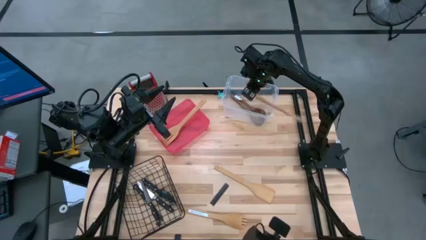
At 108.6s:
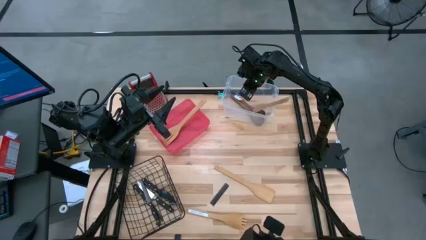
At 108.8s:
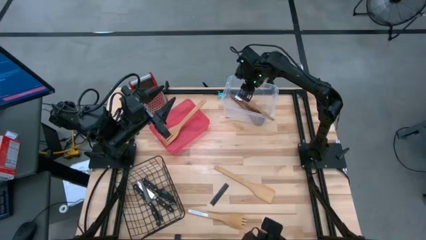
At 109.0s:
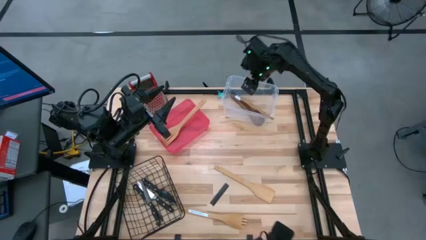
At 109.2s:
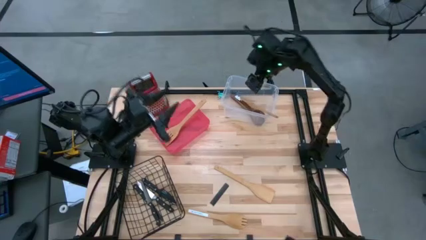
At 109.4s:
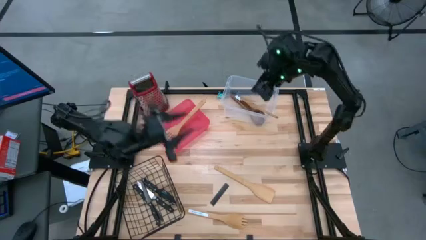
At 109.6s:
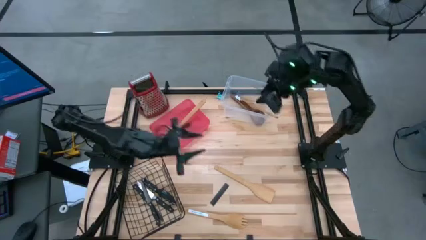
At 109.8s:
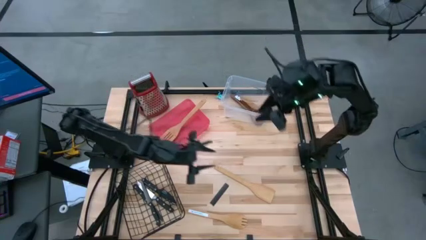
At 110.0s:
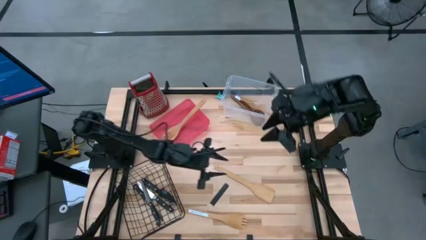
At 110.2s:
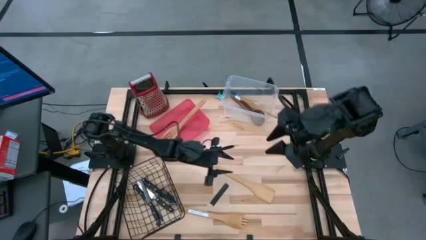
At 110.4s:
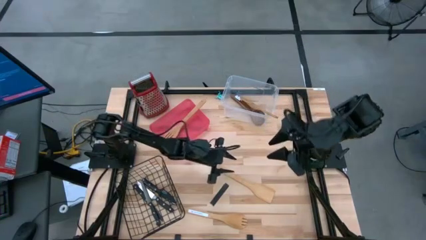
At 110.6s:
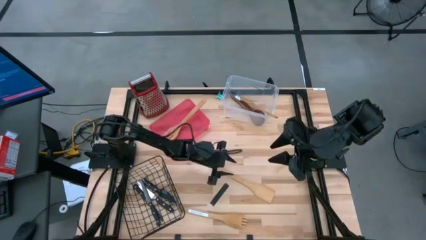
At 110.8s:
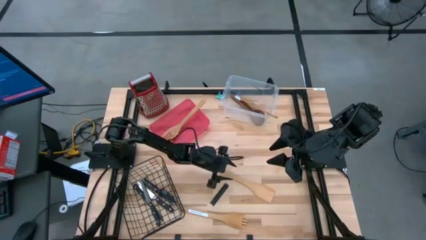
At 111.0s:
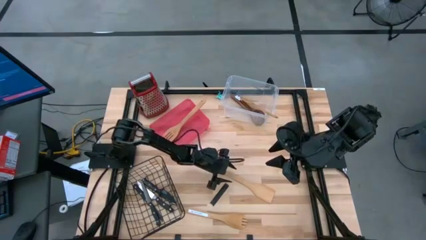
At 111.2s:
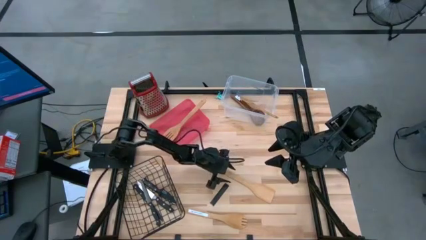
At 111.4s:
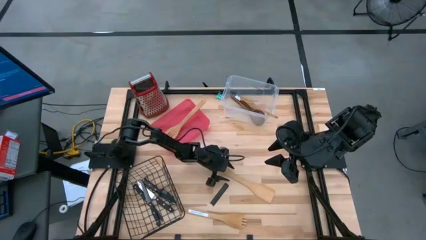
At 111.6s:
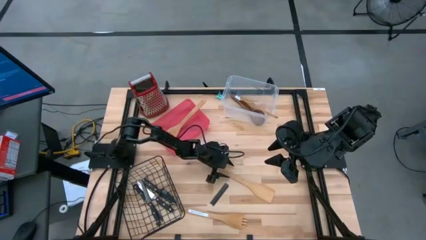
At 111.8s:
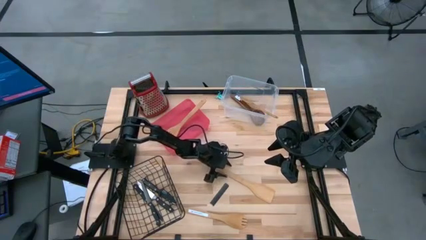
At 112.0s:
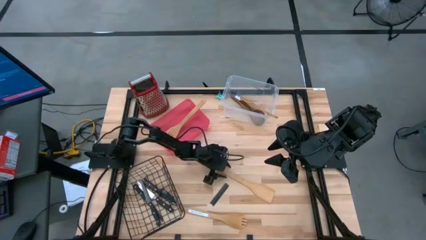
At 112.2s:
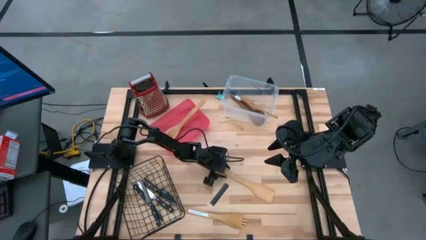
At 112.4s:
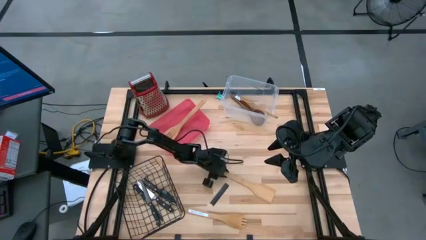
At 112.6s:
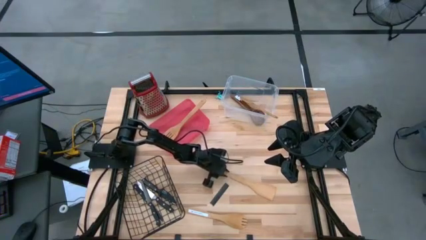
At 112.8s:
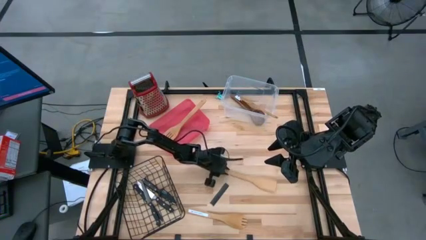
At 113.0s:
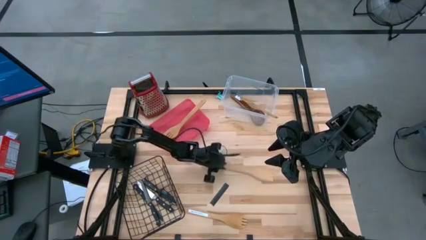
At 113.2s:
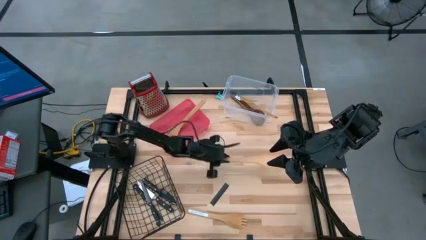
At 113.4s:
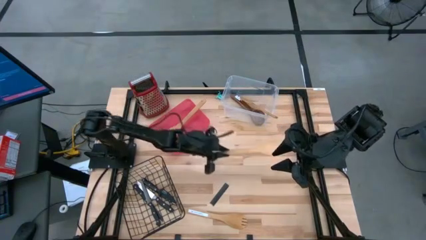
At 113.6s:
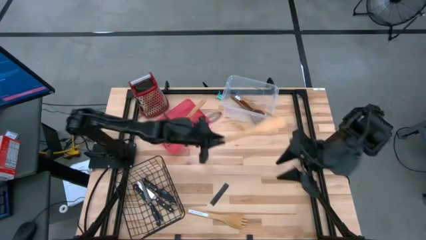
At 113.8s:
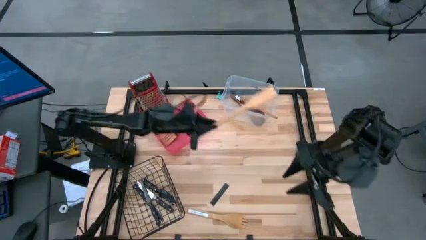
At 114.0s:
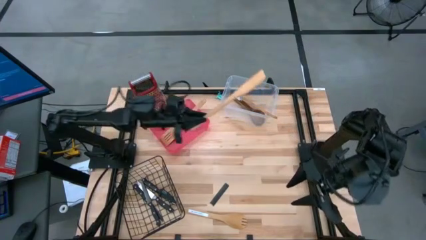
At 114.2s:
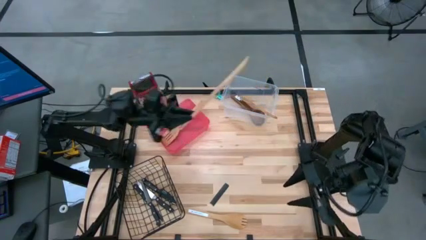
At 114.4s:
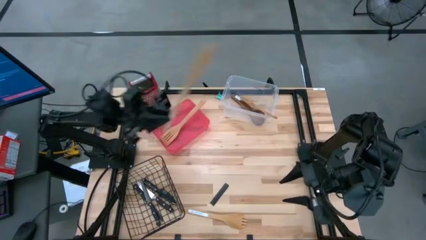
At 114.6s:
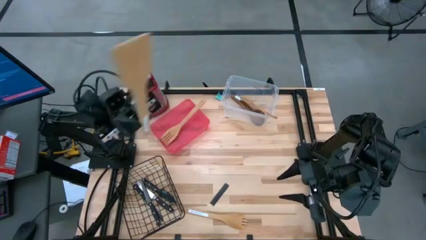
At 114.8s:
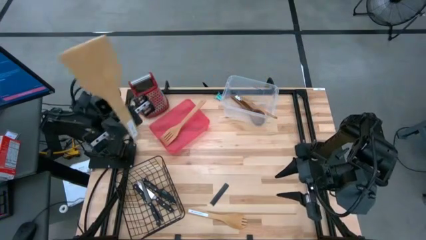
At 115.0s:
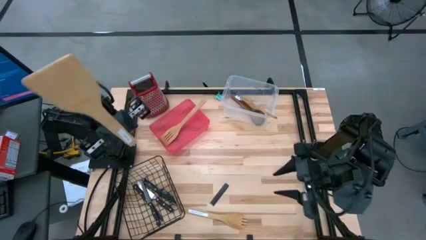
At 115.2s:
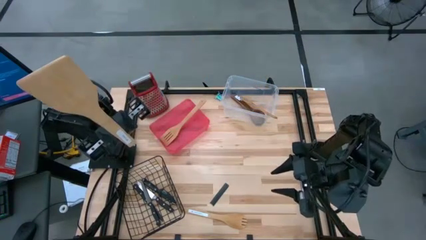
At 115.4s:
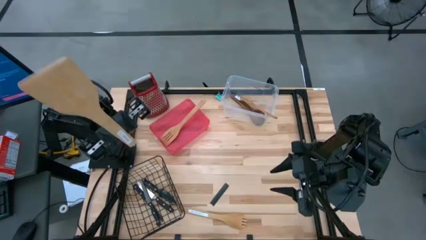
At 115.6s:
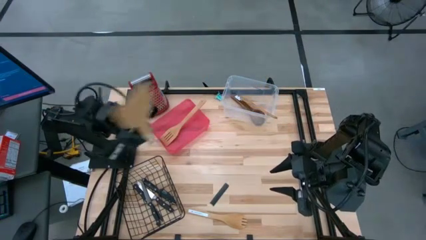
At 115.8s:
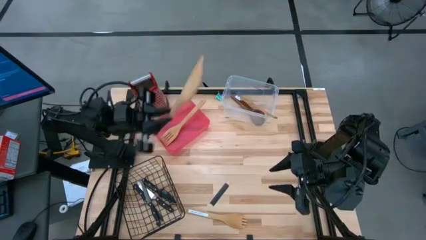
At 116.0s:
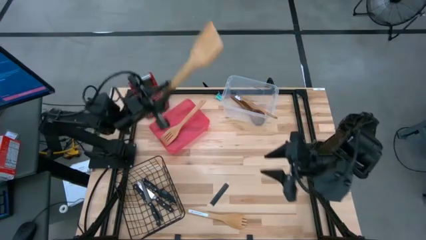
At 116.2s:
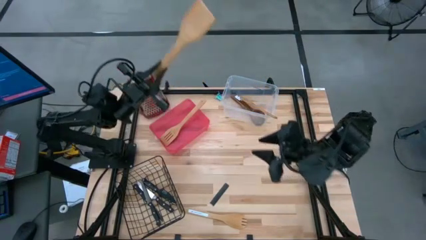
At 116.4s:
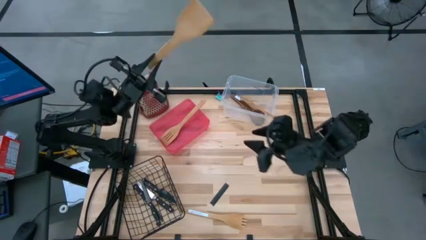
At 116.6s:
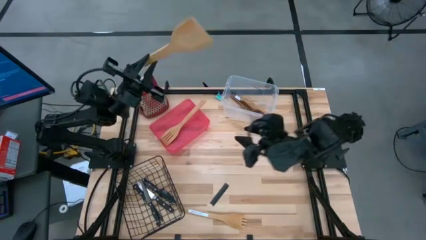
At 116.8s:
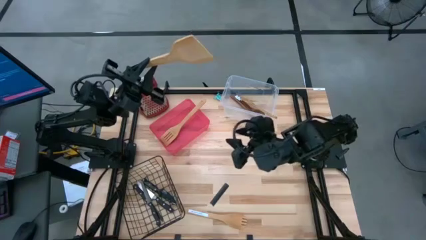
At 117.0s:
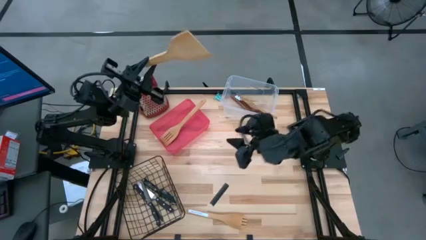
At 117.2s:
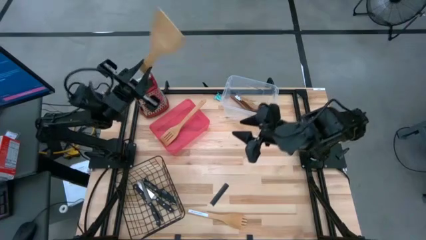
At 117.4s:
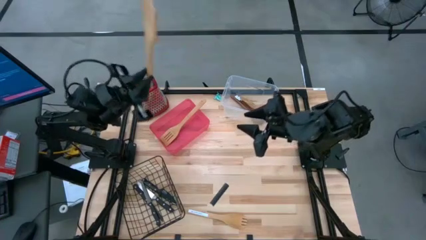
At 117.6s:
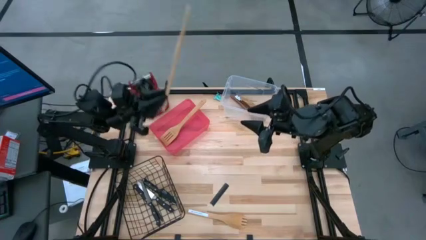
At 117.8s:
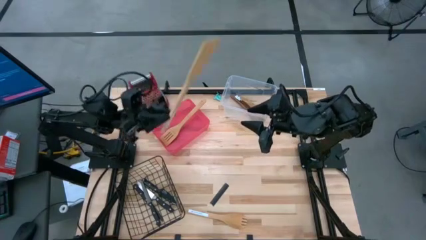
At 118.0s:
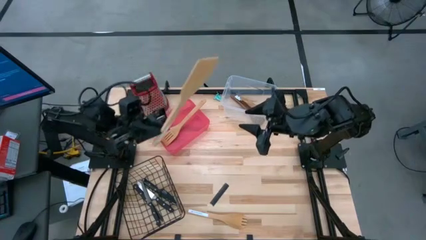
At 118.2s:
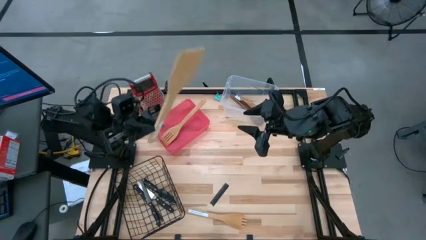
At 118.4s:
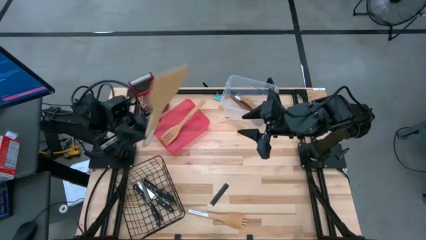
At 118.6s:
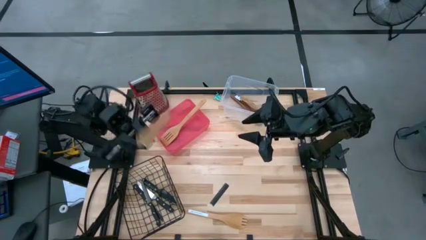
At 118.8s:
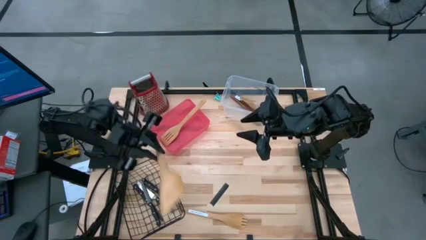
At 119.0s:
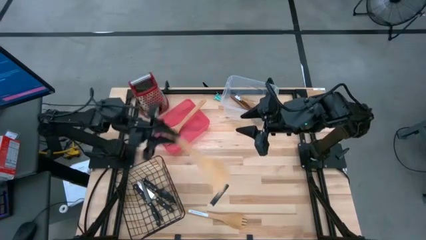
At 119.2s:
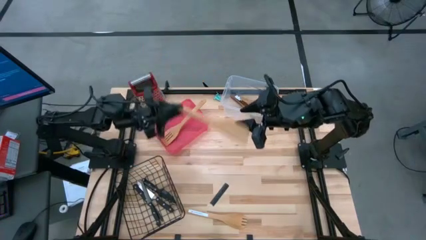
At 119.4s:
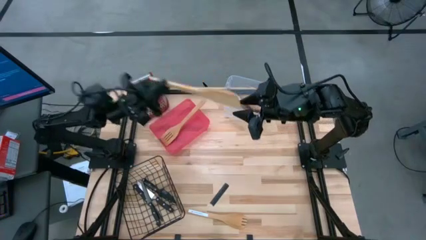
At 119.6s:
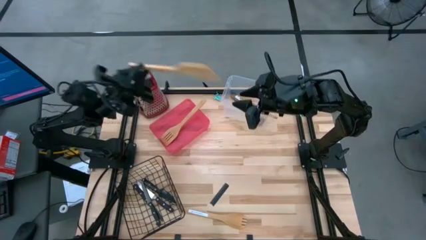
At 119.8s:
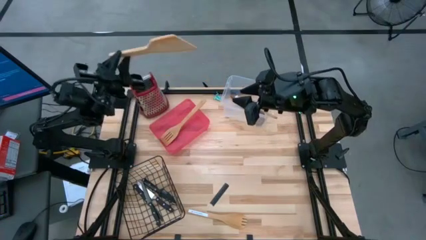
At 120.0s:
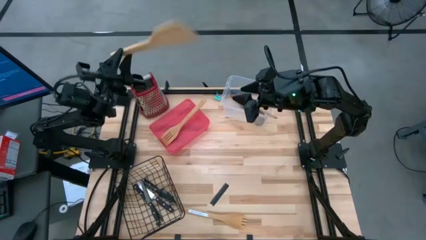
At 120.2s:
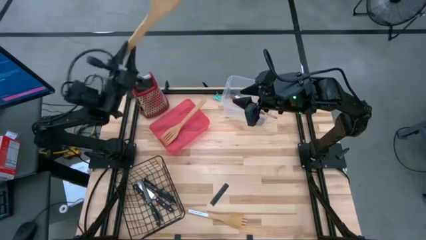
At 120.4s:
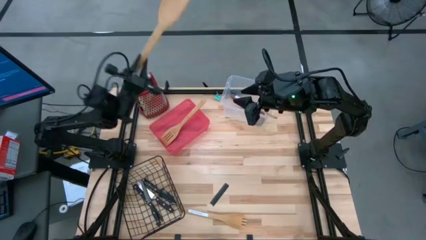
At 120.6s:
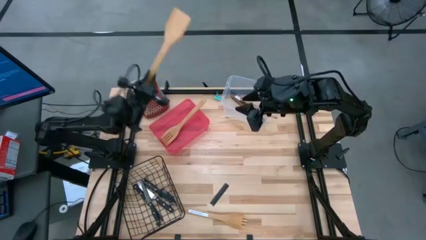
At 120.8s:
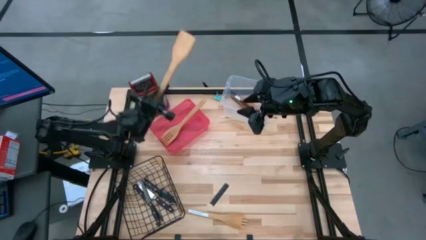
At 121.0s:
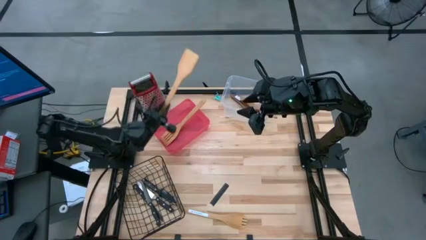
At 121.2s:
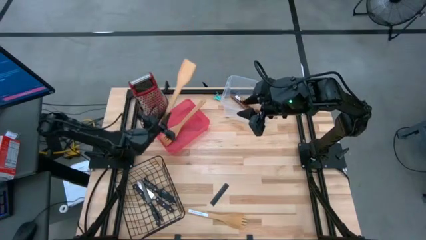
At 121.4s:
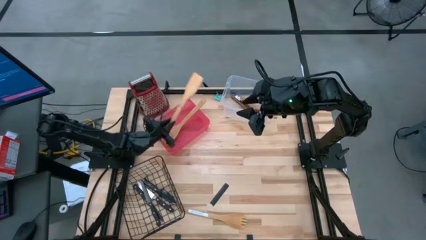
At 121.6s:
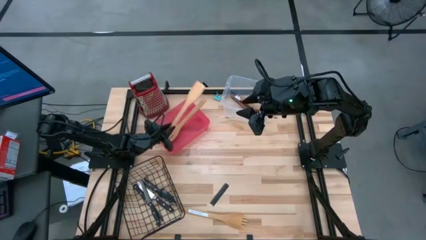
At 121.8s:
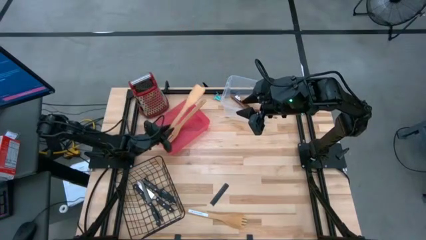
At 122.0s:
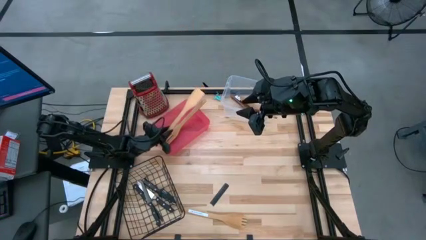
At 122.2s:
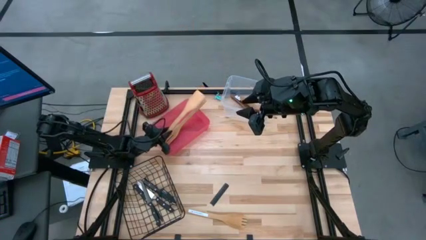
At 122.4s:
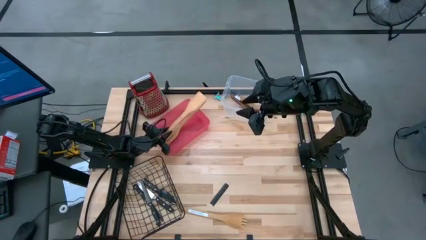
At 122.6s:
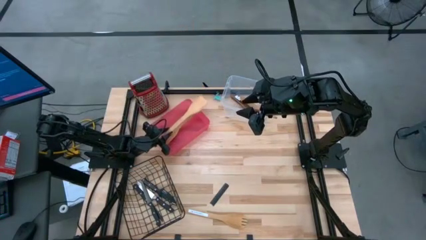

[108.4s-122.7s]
Task: Pick & Place Kitchen Items
Put the wooden spatula into the red bin

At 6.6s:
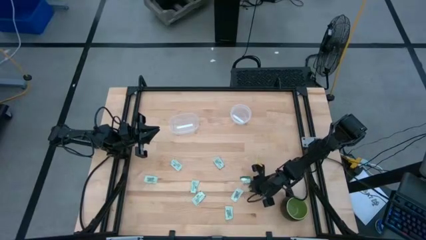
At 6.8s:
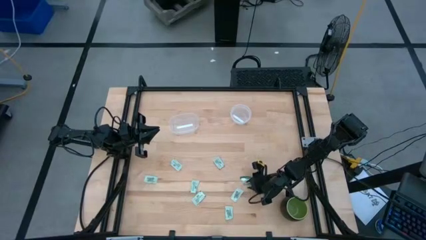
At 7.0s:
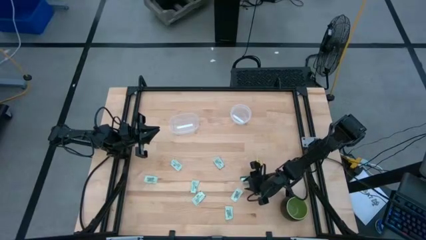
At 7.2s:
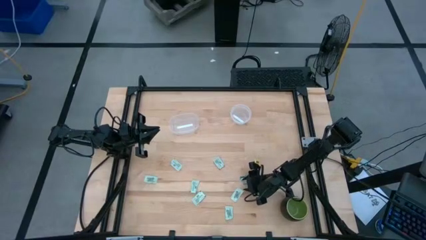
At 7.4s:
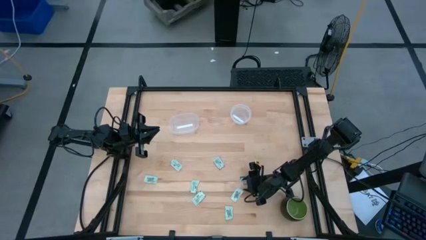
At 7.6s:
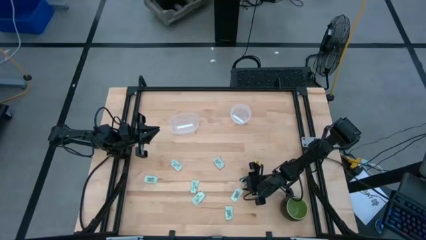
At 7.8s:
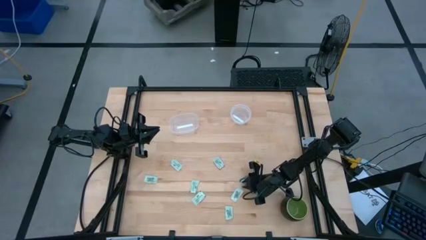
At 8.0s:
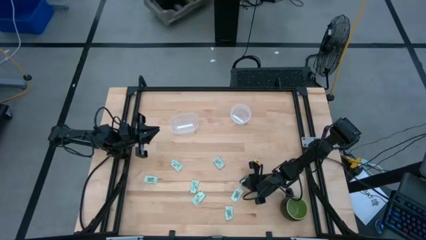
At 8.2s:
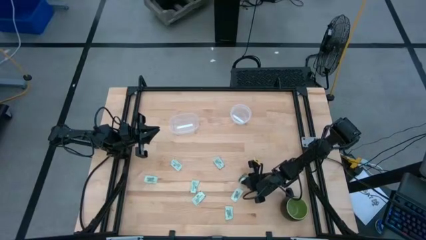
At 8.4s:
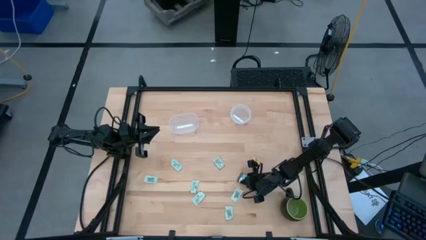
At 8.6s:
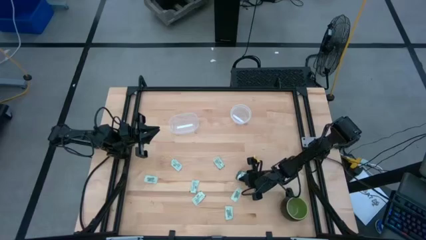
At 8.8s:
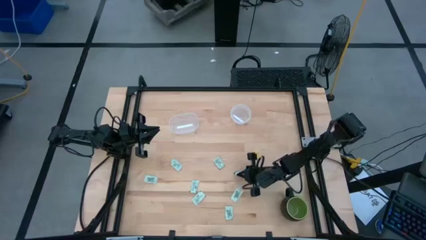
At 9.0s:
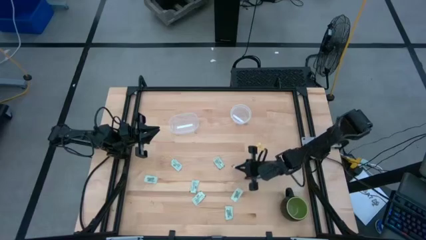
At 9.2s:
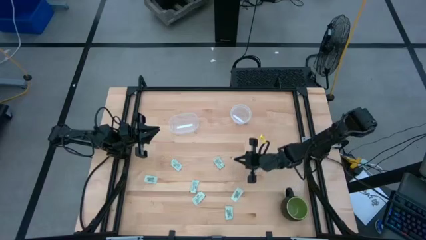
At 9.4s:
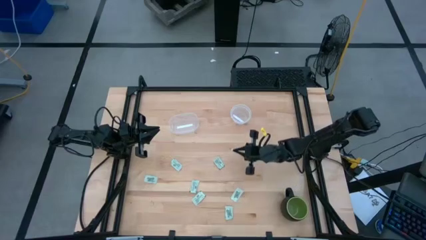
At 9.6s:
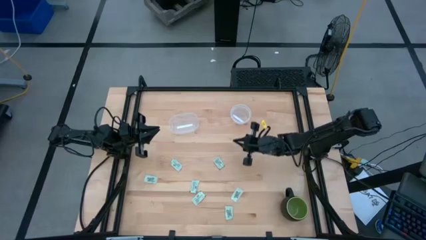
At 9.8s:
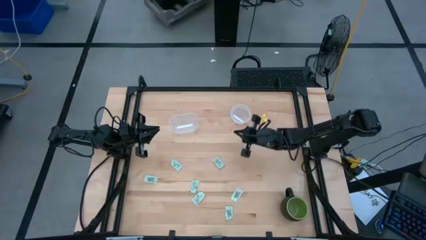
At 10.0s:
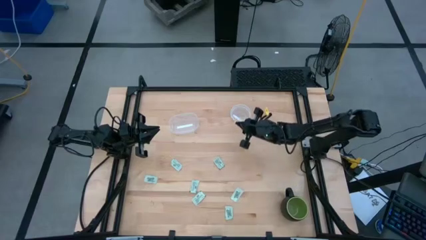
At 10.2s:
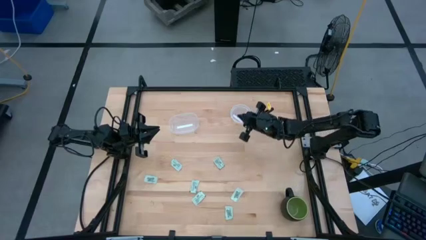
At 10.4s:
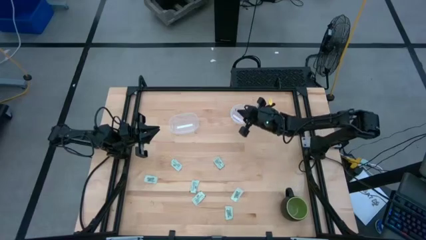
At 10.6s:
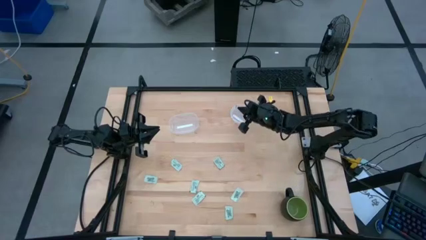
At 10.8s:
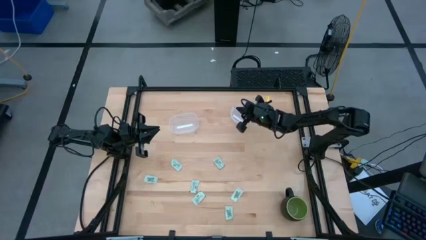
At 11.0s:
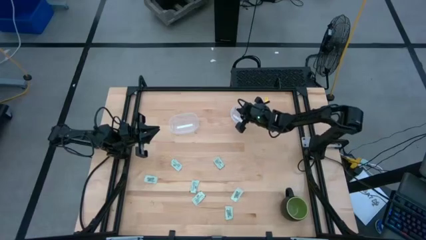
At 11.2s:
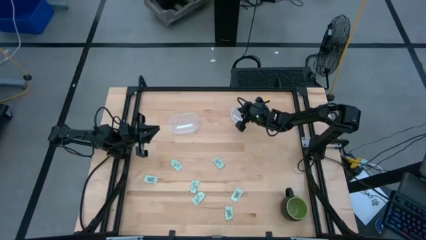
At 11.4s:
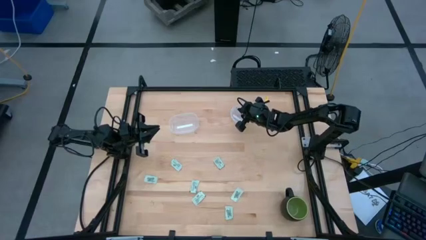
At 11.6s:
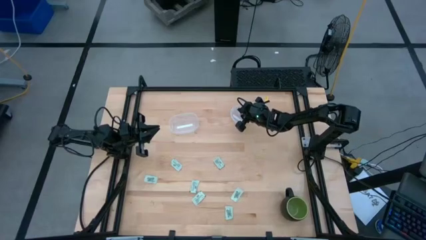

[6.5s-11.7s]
Task: Pick and place Stevia / Truvia into bins
Put the green stevia packet into the right transparent container
